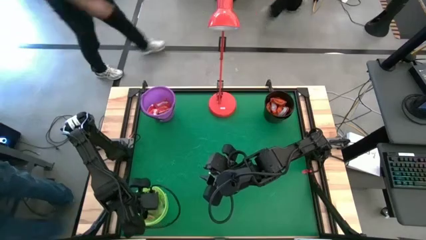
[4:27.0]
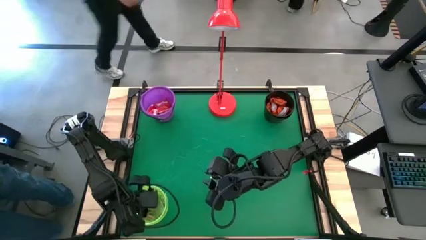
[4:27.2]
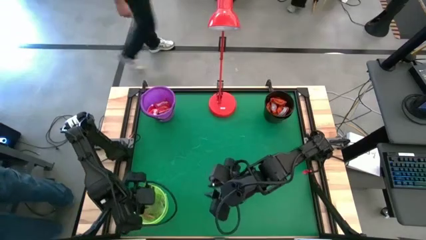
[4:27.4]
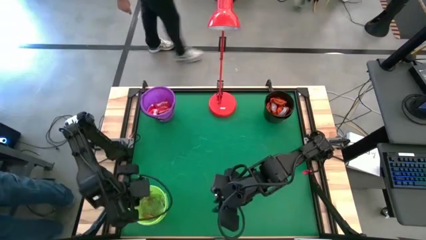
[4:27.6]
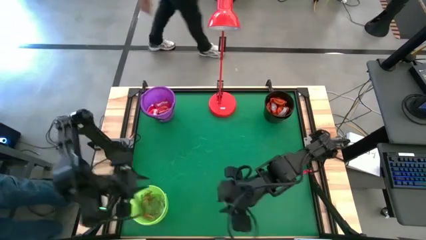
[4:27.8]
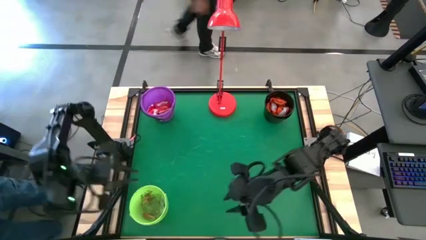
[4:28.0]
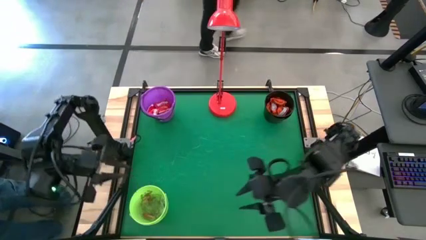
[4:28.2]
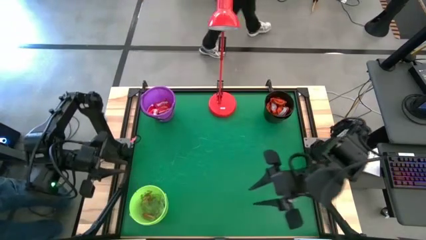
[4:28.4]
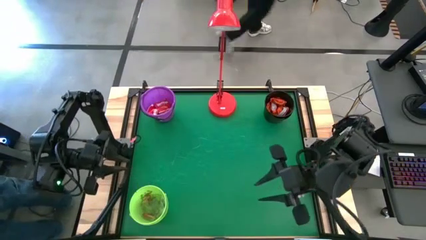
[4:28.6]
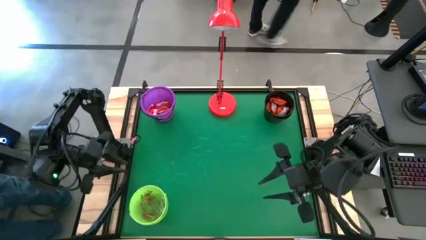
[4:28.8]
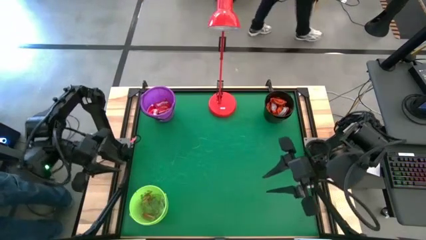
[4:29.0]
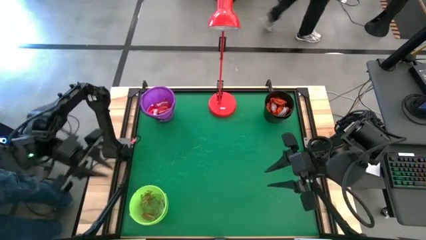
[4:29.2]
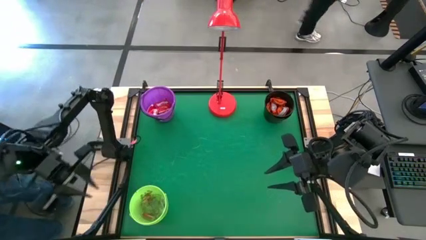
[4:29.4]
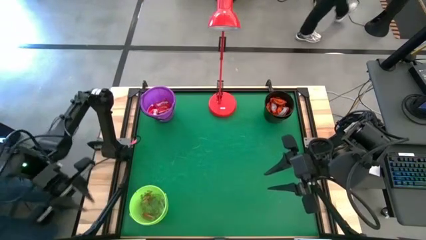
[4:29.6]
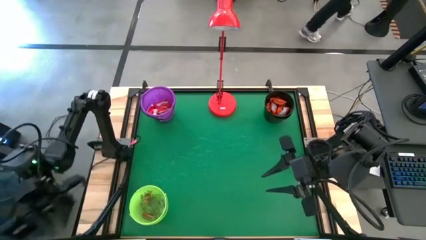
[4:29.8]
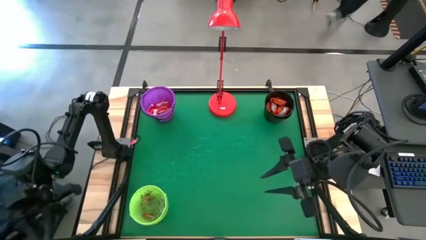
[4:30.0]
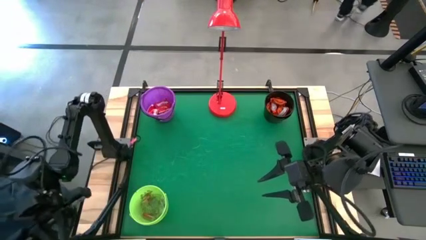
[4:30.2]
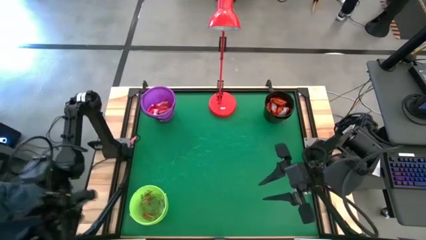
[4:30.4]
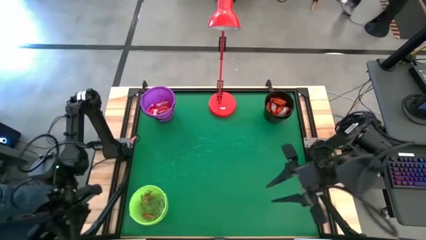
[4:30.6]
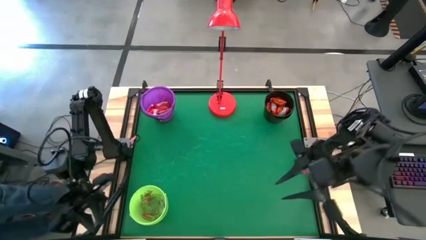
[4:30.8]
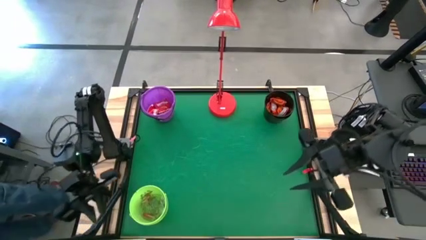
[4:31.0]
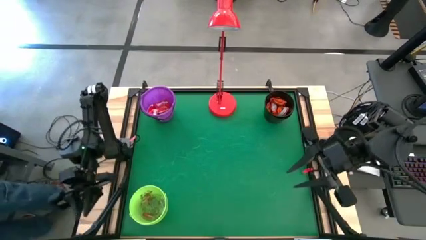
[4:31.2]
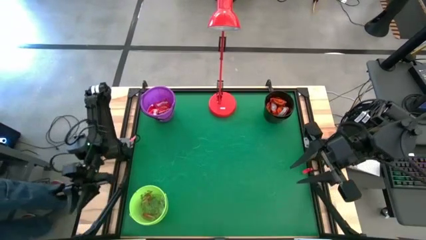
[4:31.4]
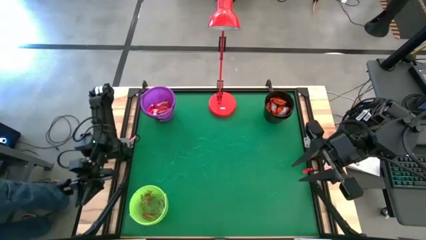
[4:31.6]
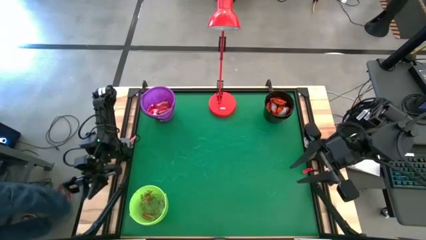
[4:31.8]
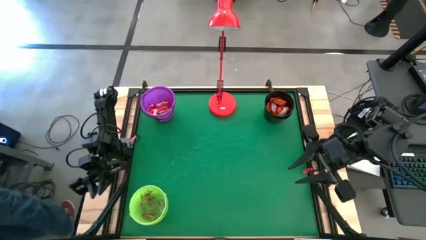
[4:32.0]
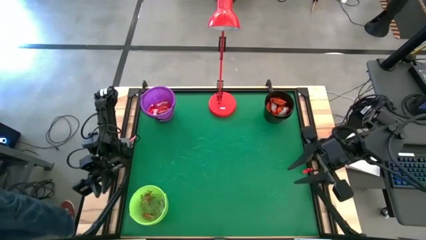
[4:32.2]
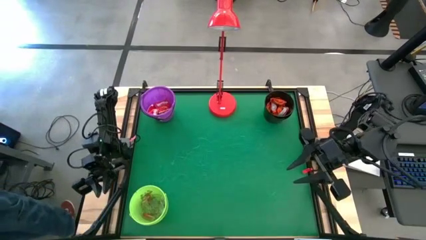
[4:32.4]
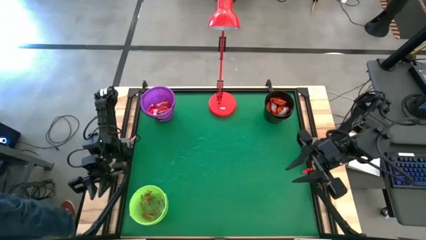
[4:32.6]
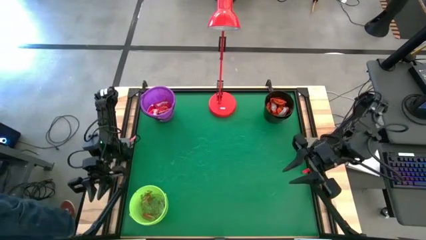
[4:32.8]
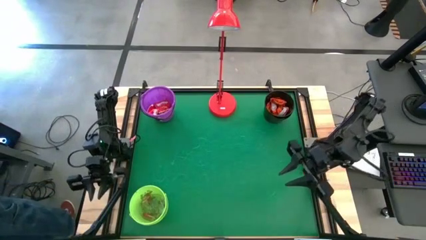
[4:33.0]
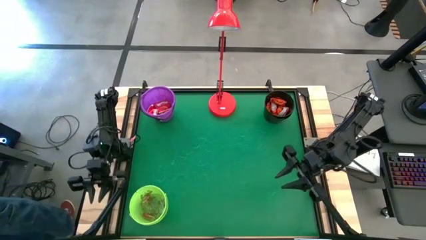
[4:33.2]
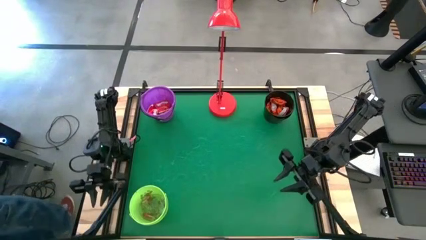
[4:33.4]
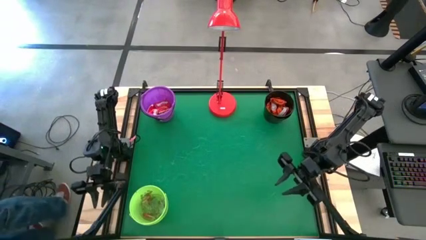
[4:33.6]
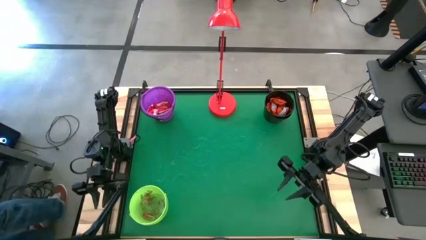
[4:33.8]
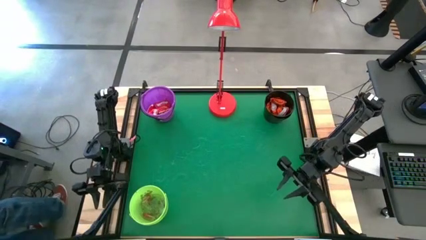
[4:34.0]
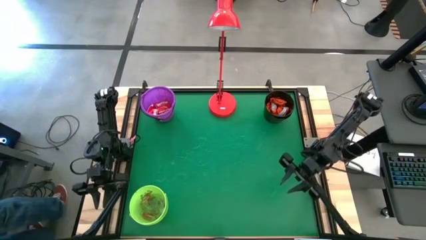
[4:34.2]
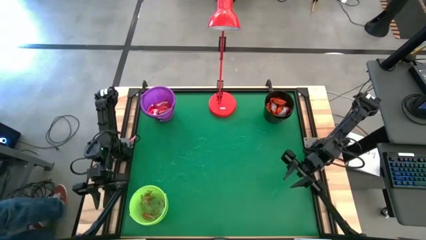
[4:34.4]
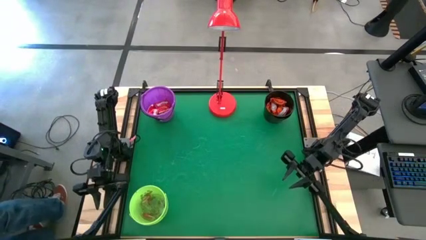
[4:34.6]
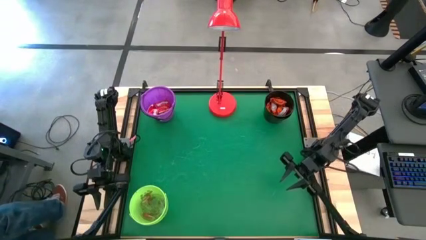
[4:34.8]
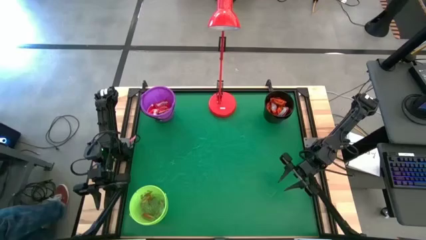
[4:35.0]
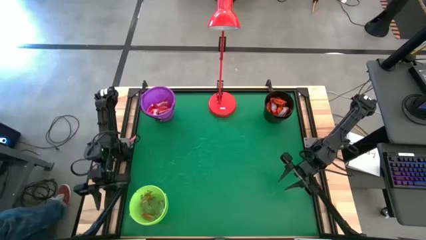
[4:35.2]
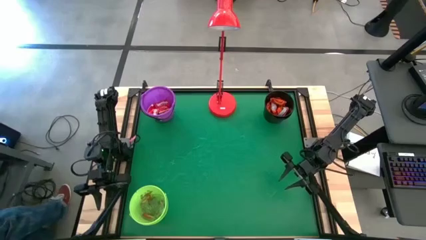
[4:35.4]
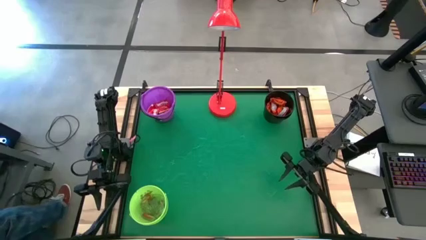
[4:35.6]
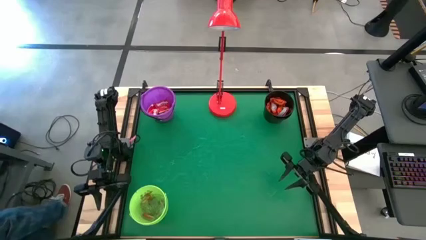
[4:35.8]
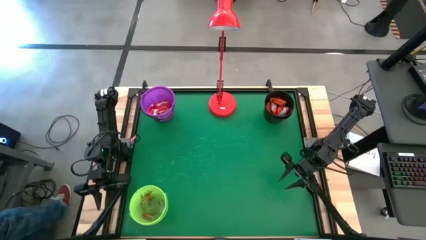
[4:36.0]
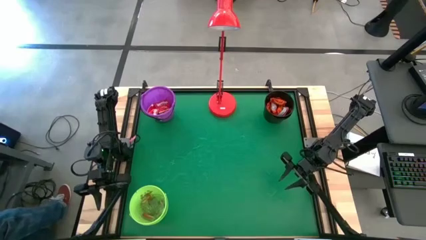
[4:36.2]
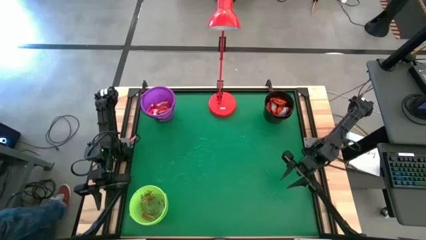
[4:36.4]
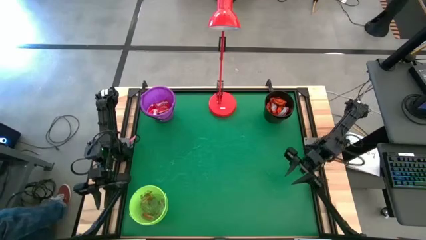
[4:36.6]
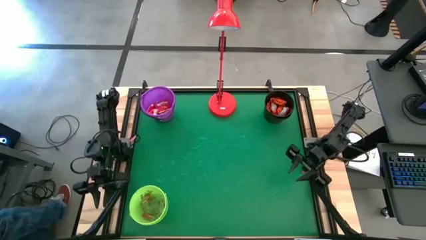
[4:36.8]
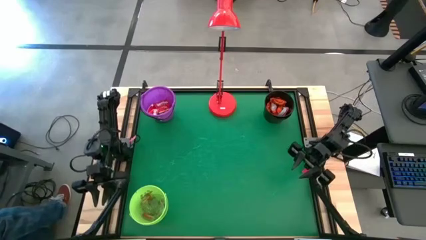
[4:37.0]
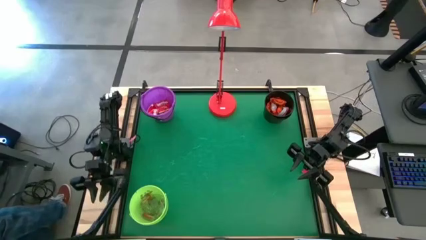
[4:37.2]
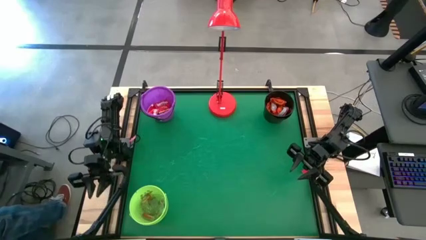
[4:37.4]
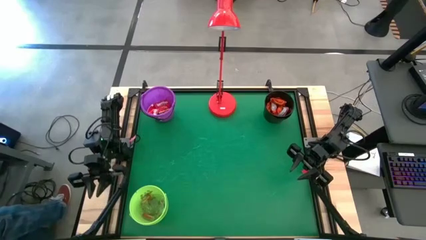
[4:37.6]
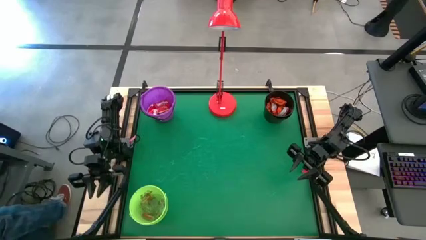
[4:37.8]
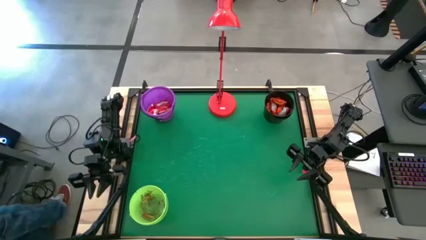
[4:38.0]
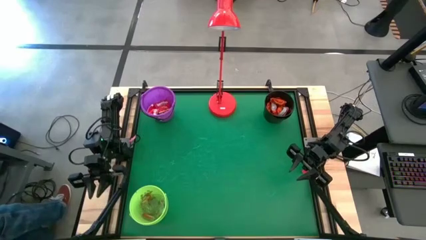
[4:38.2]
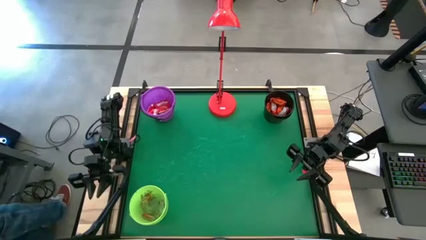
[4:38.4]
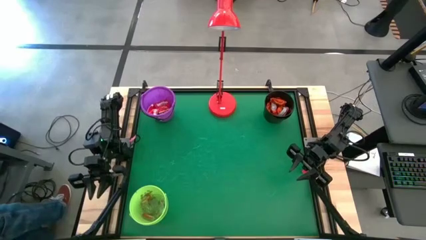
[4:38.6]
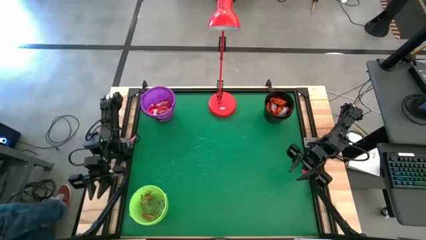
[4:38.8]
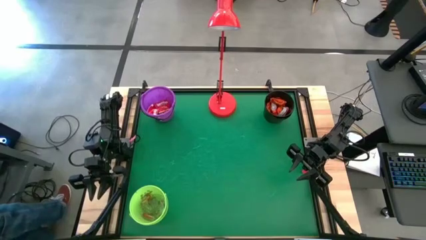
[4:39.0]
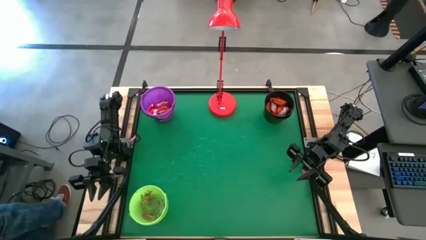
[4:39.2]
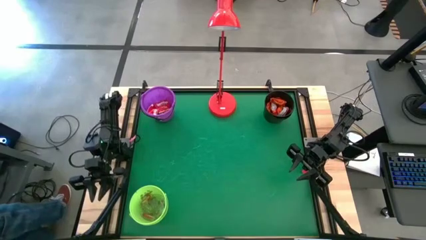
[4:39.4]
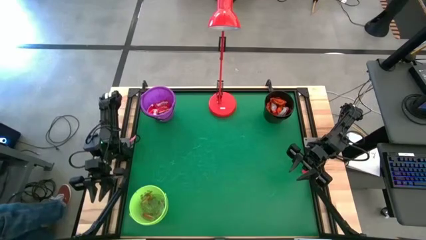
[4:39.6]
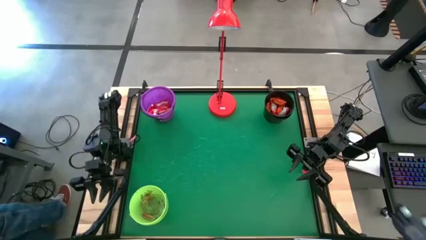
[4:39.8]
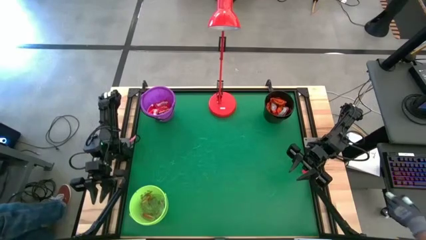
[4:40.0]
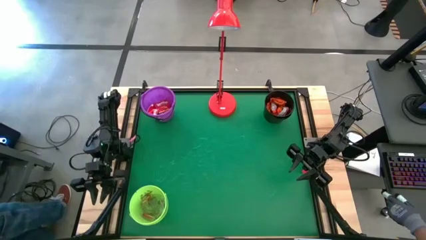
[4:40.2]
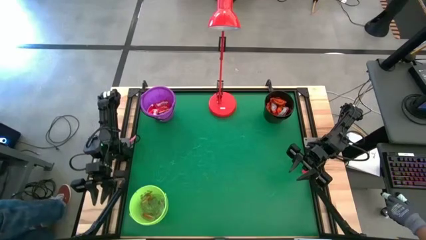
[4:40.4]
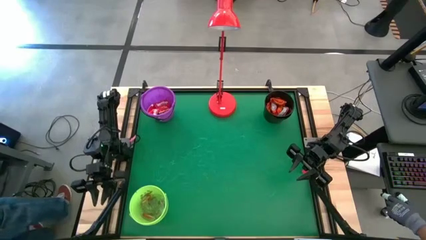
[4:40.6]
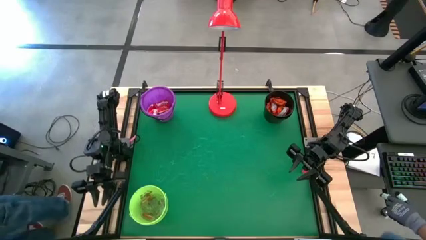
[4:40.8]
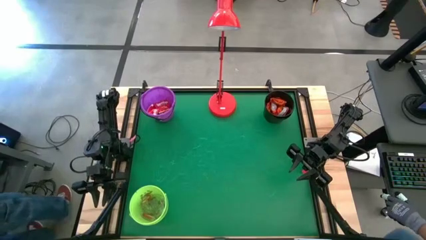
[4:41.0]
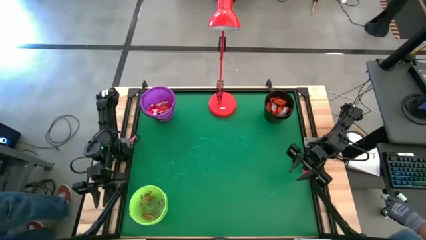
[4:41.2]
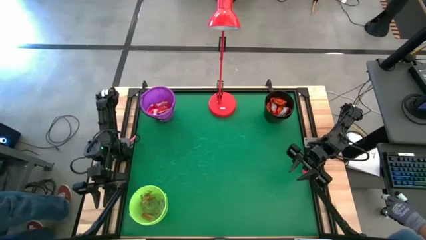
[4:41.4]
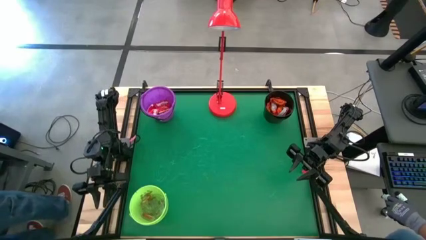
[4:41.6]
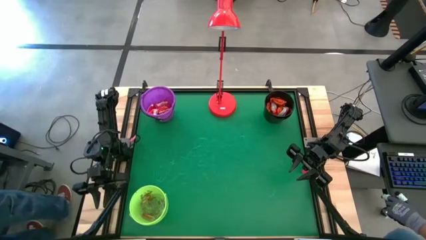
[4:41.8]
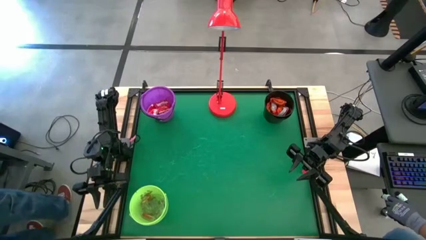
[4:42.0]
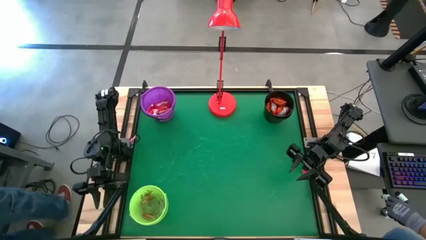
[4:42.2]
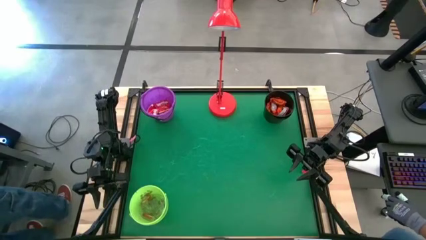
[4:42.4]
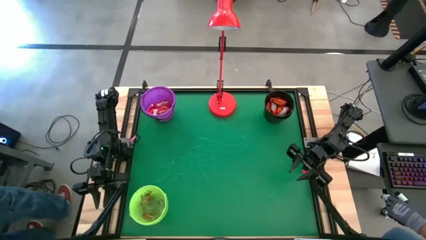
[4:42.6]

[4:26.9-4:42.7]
Task: Sort candy
Return to Home Position
